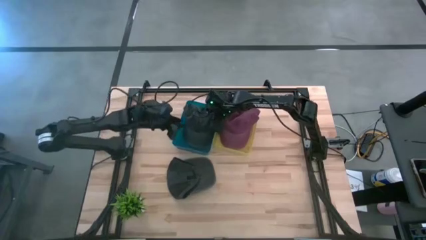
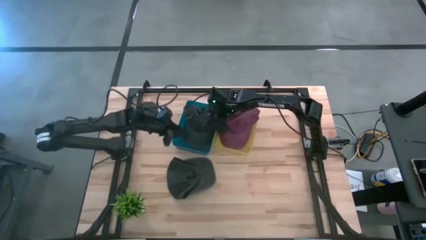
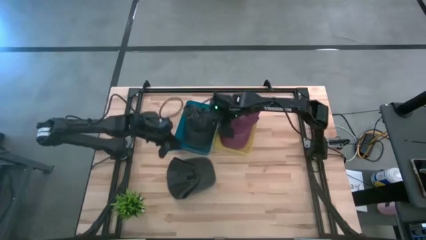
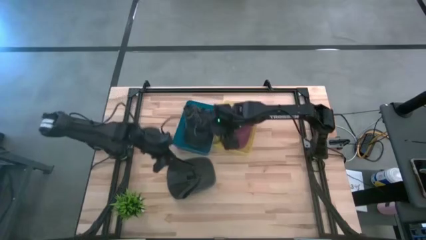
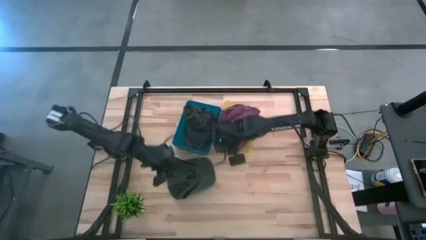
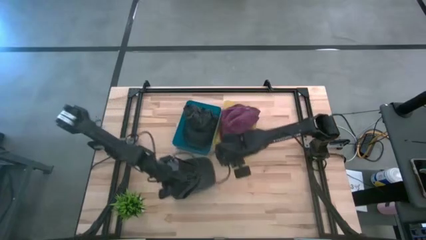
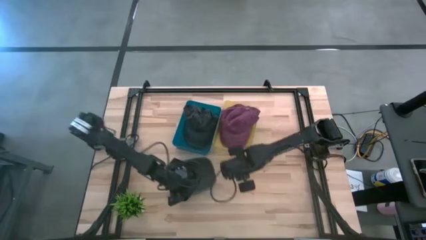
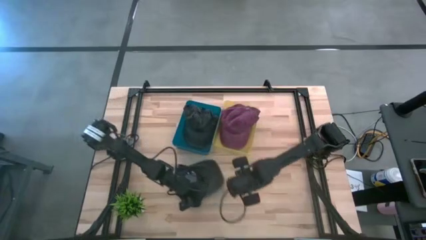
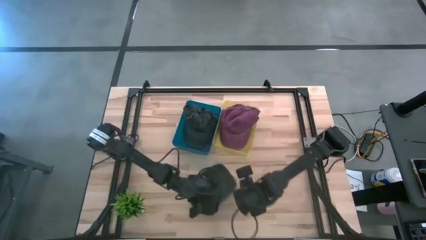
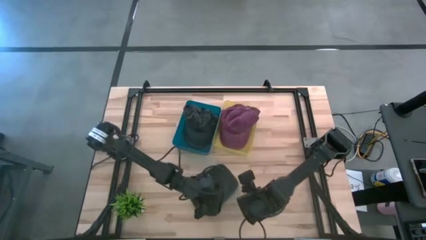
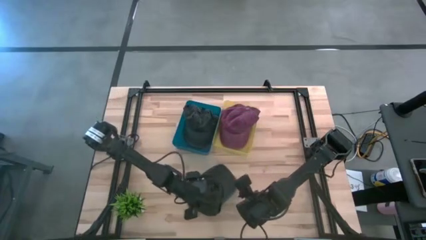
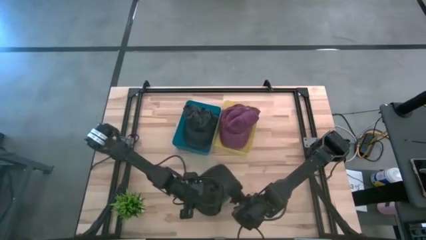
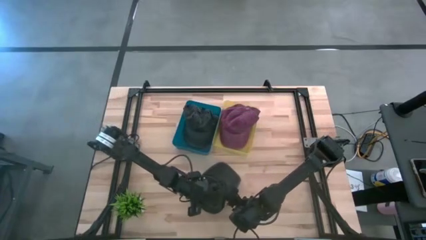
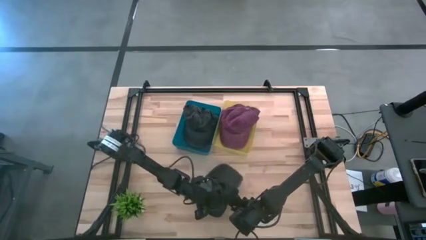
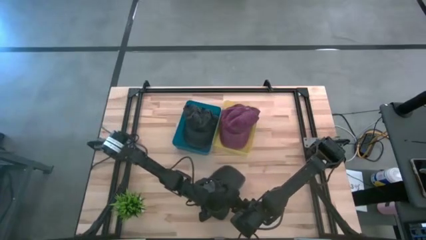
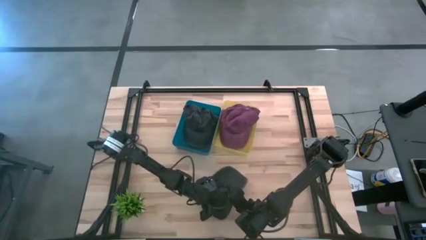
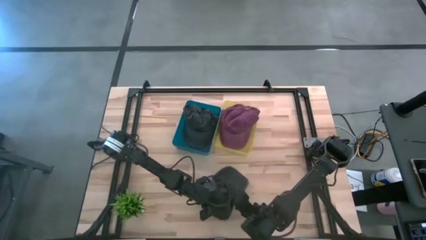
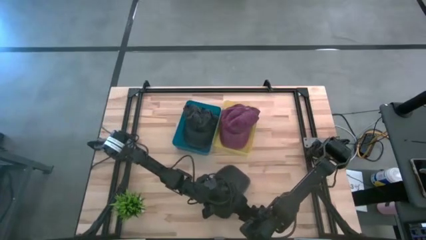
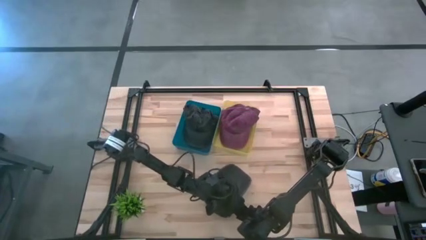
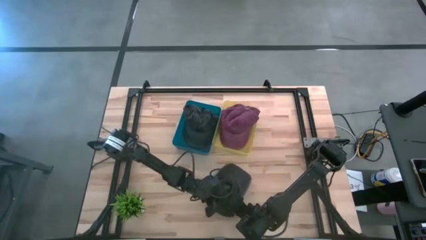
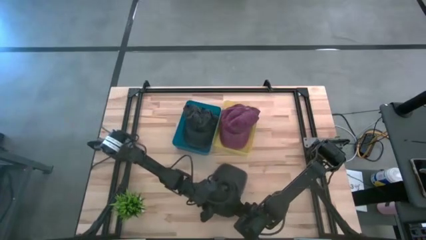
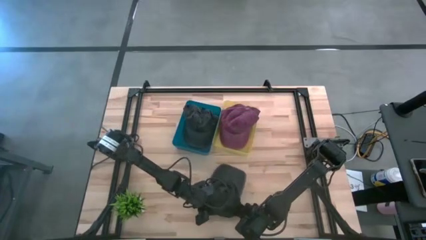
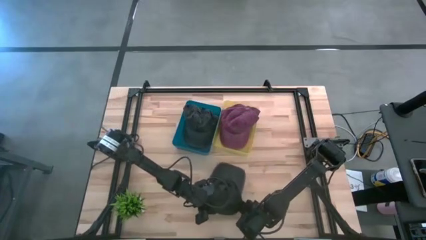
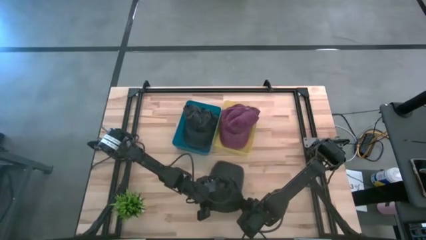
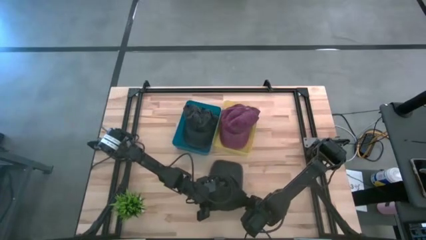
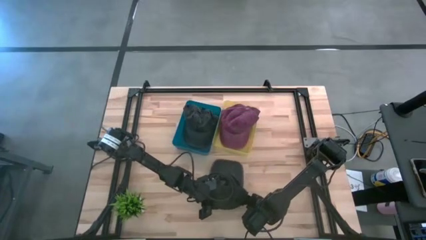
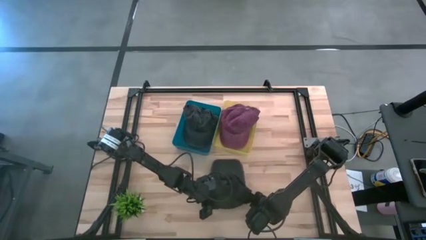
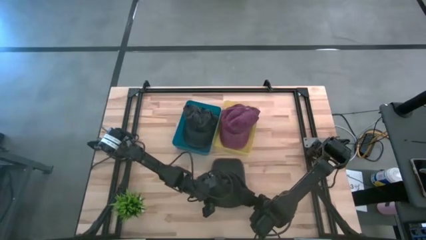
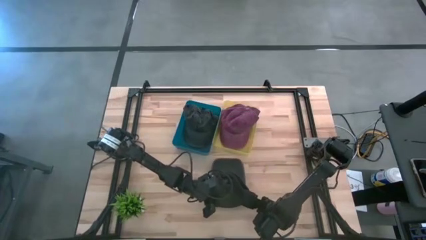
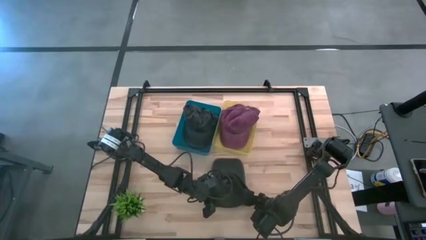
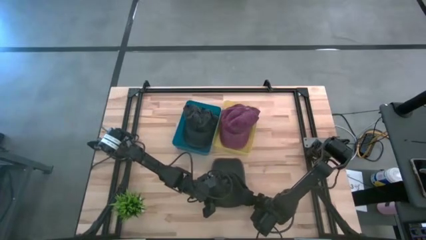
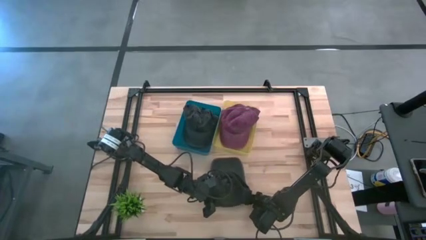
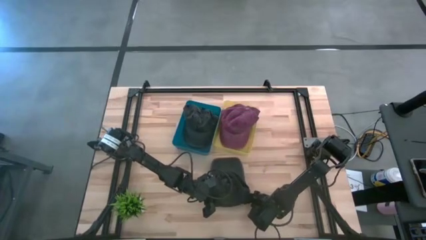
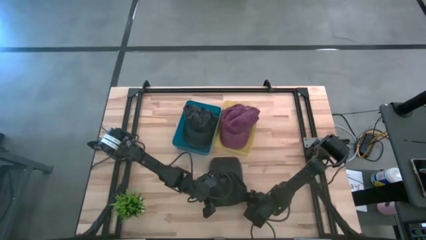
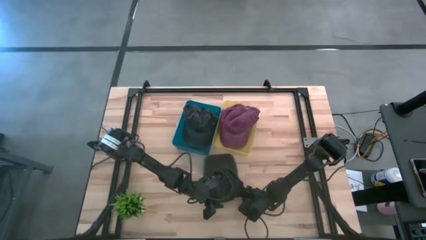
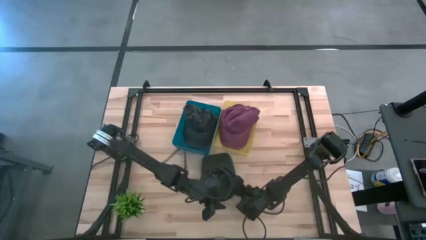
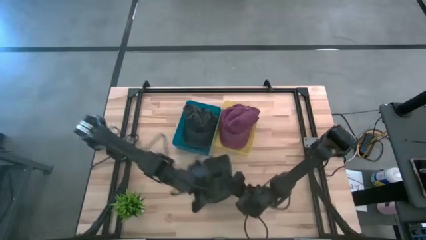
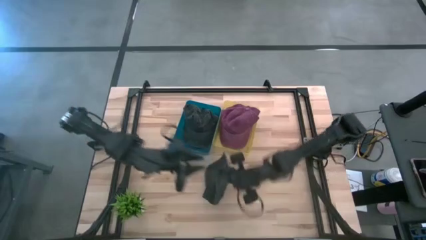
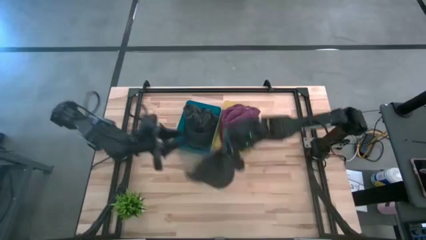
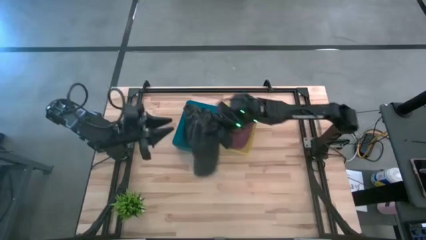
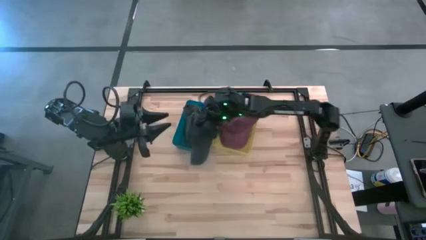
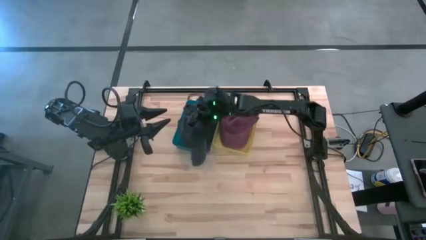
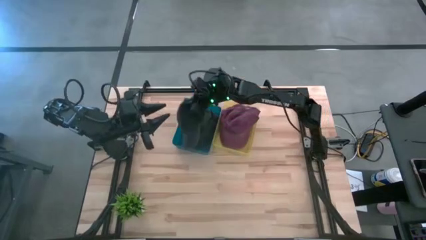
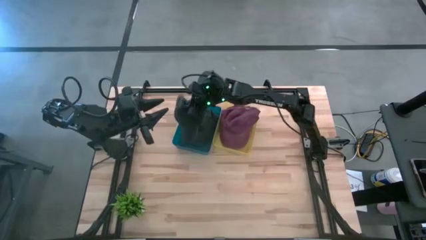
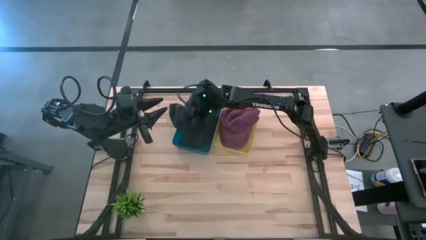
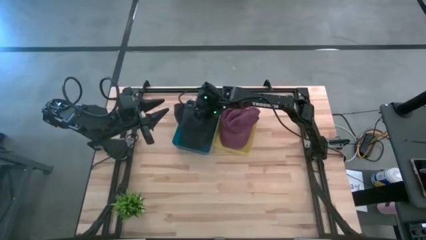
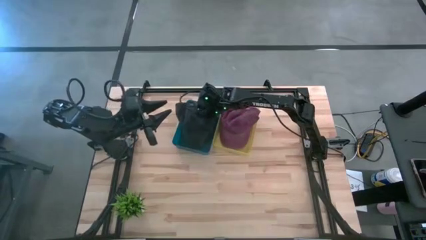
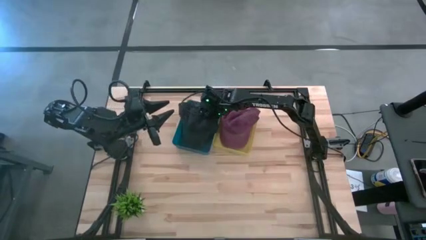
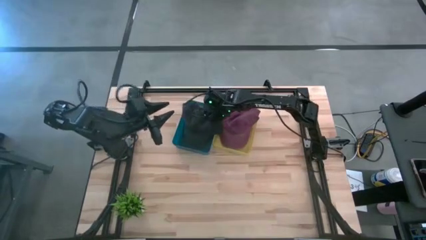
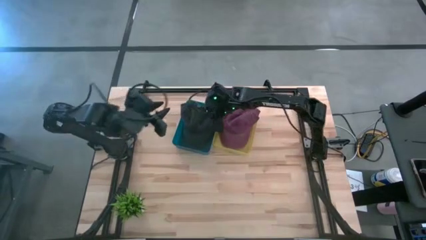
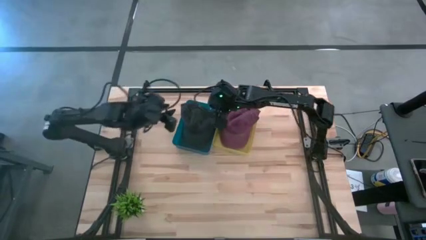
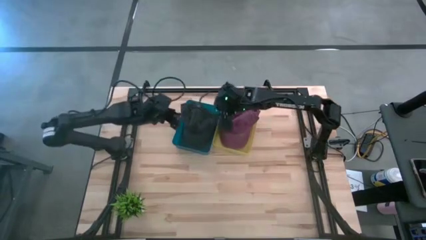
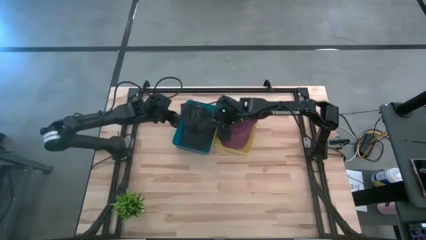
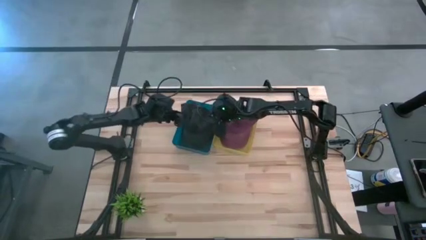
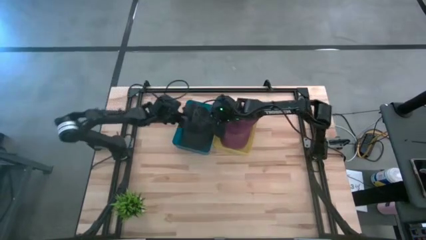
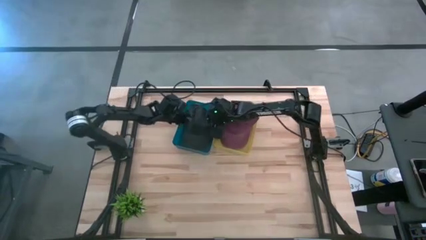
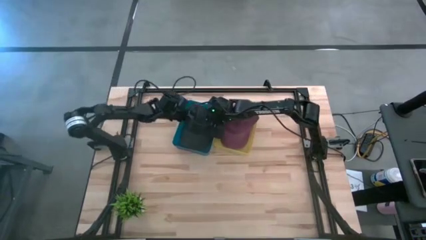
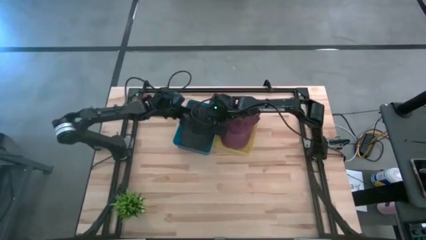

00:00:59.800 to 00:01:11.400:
Task: Pick & Place hat
Put the black cap into the blue bin

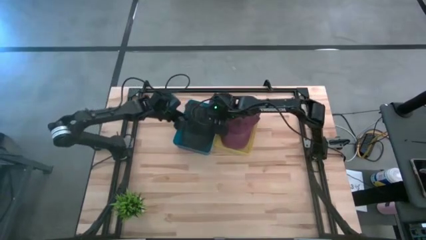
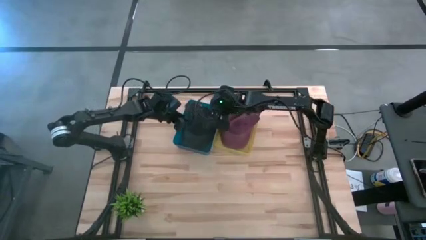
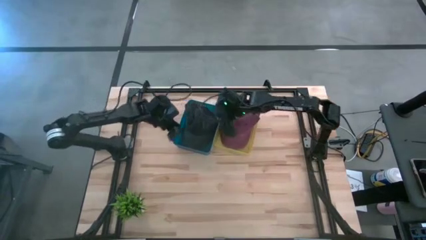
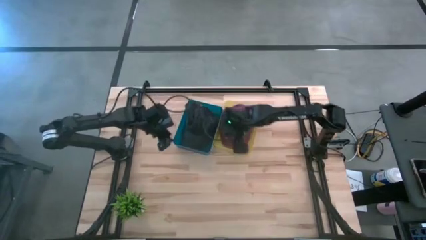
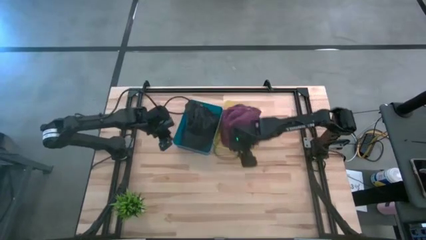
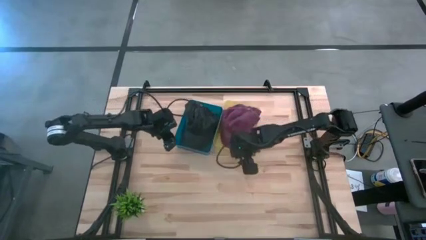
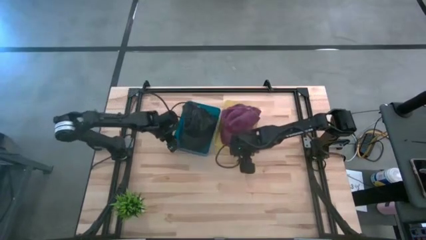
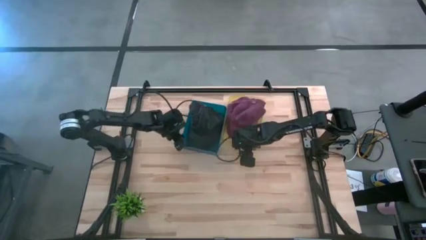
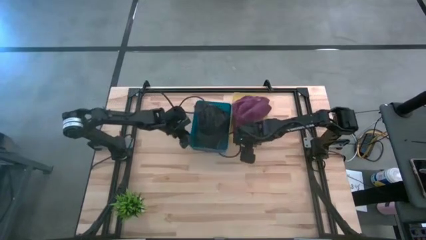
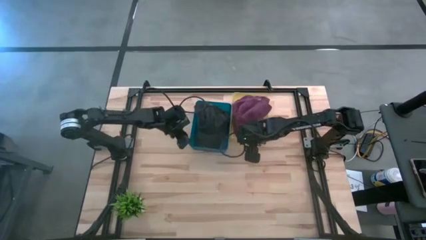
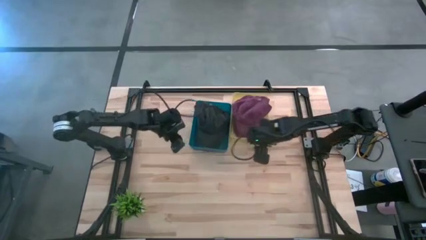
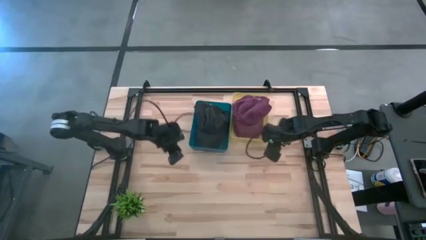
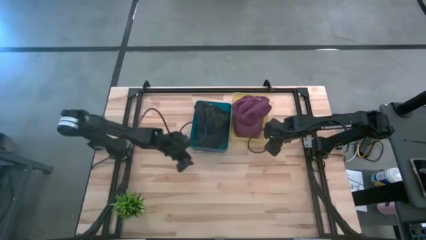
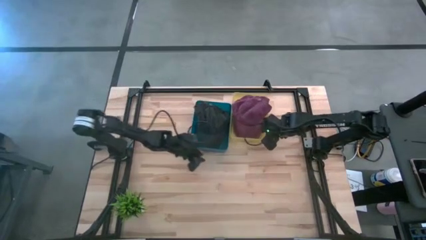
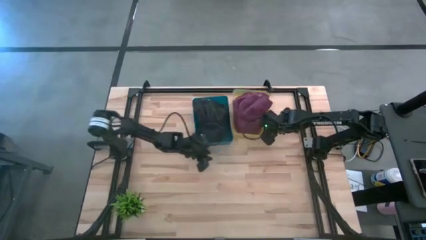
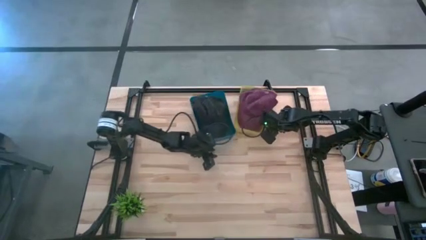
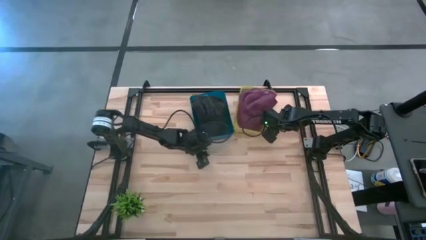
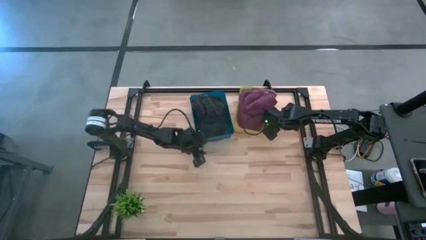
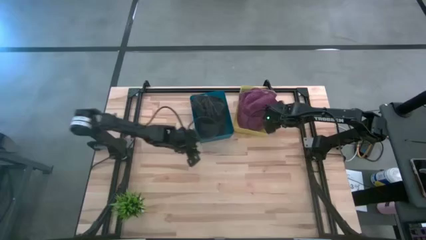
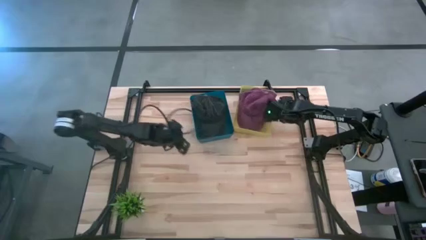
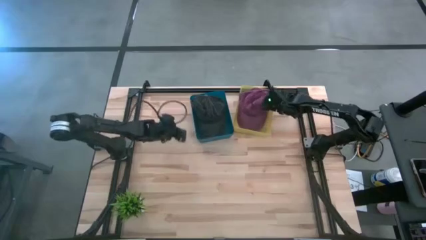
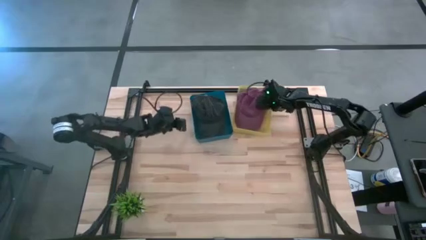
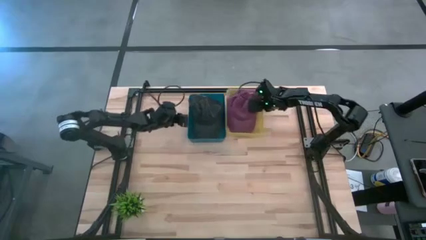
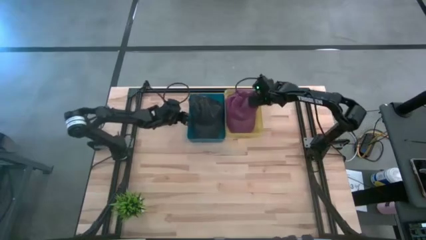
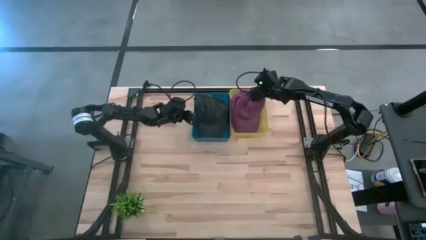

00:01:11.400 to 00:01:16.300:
Adjust the bins on the table

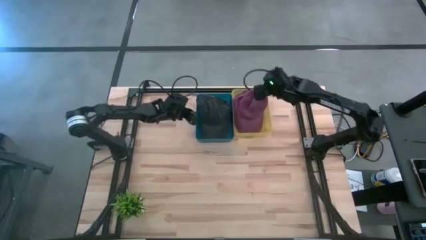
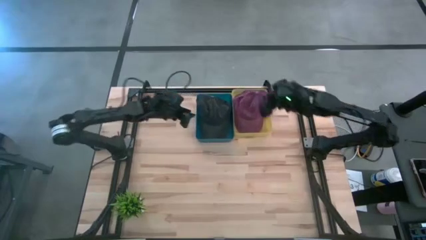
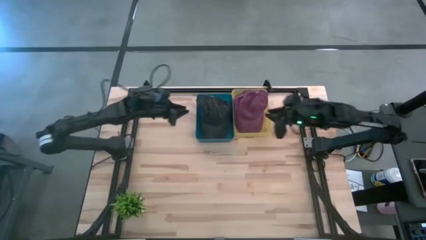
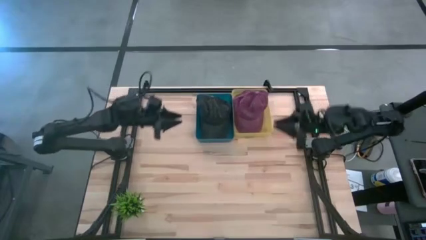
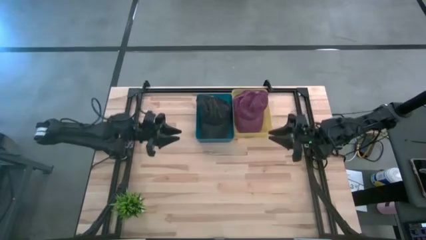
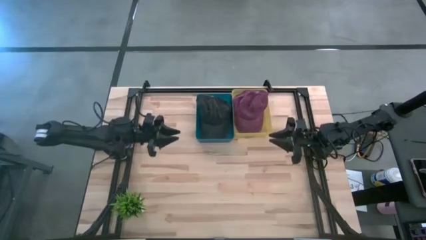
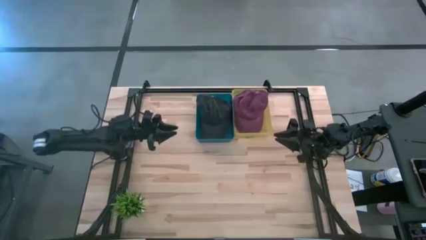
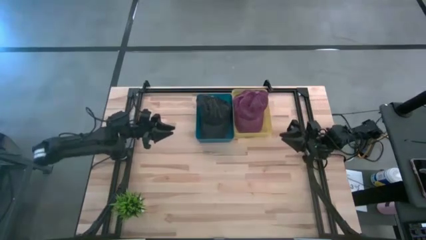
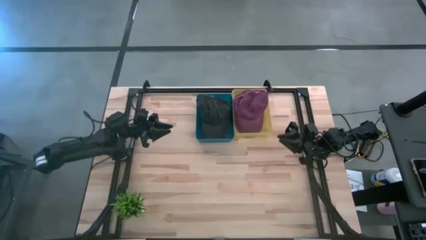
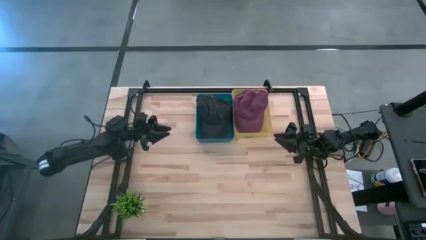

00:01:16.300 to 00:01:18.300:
Return to Home Position
